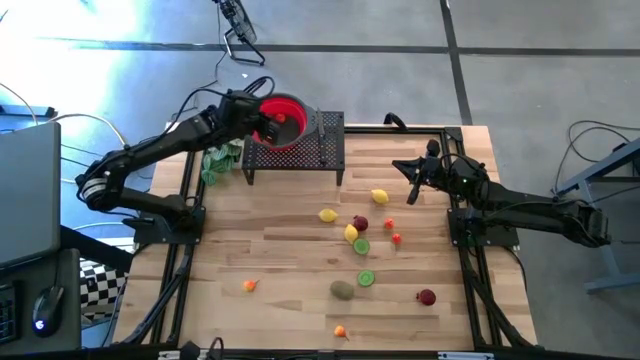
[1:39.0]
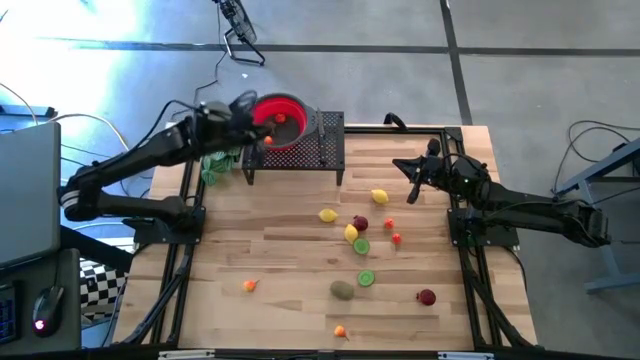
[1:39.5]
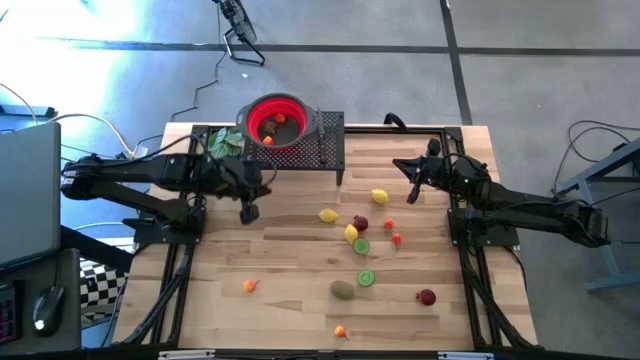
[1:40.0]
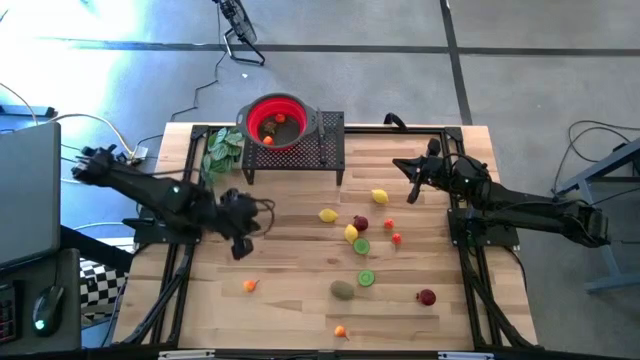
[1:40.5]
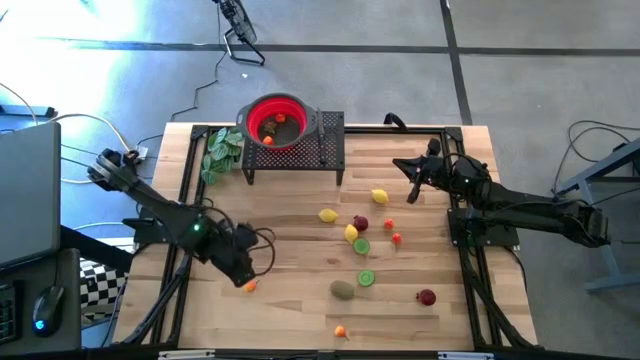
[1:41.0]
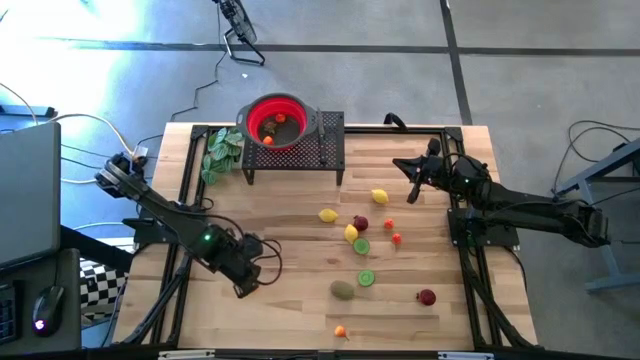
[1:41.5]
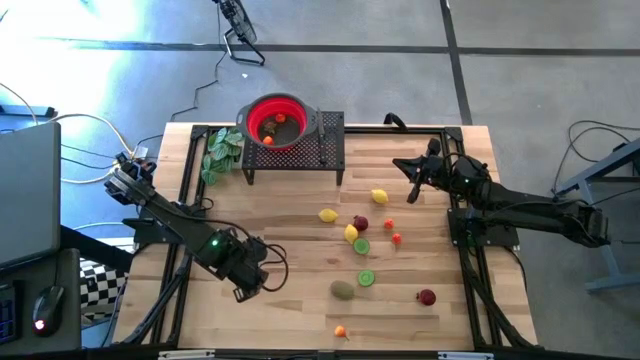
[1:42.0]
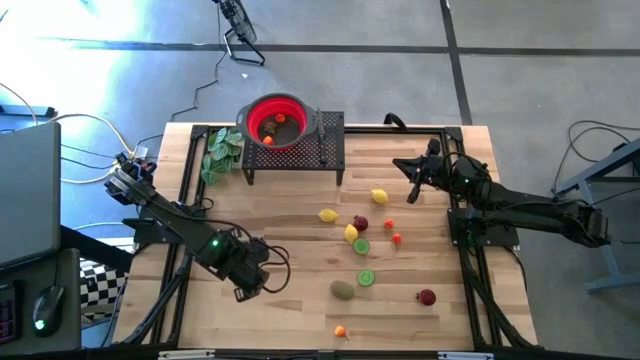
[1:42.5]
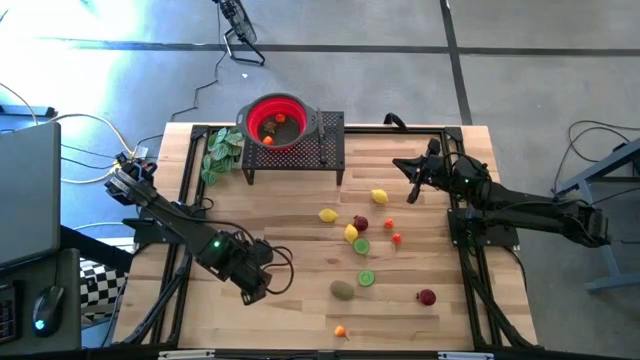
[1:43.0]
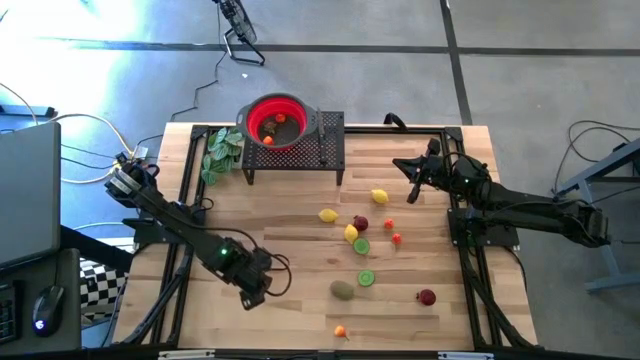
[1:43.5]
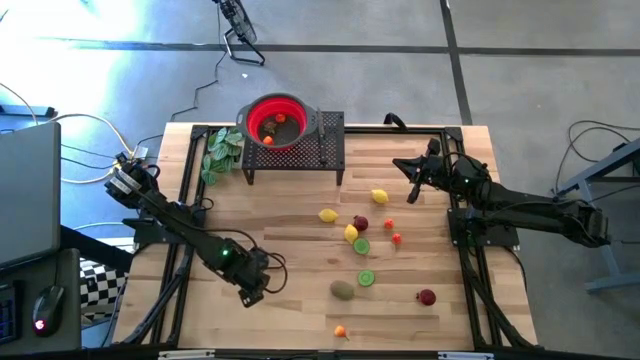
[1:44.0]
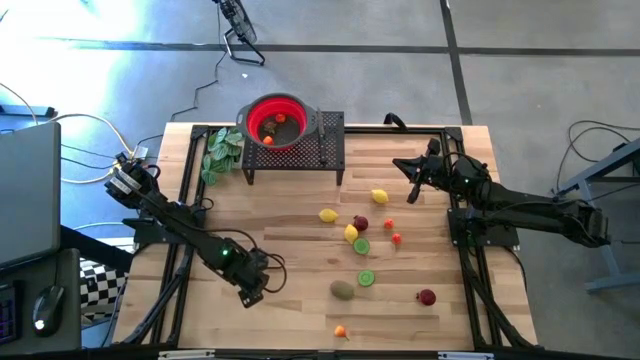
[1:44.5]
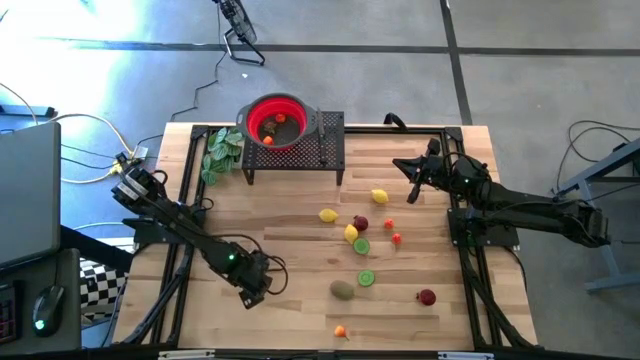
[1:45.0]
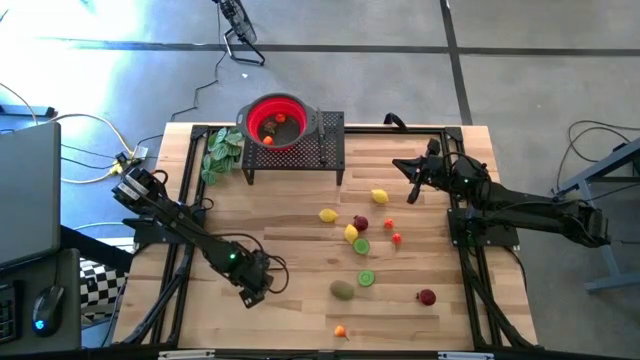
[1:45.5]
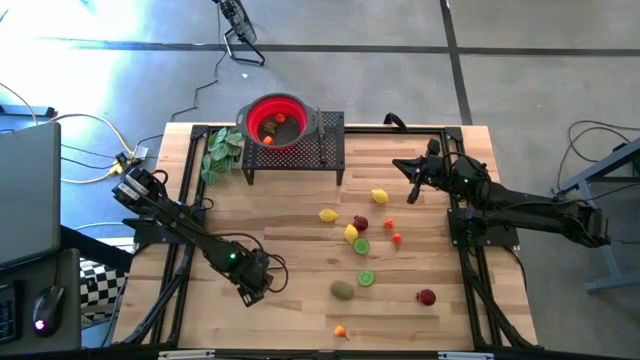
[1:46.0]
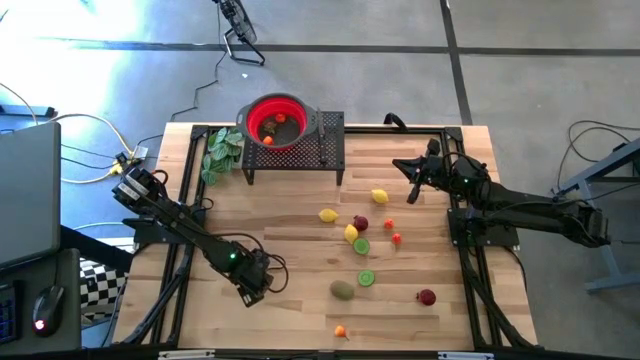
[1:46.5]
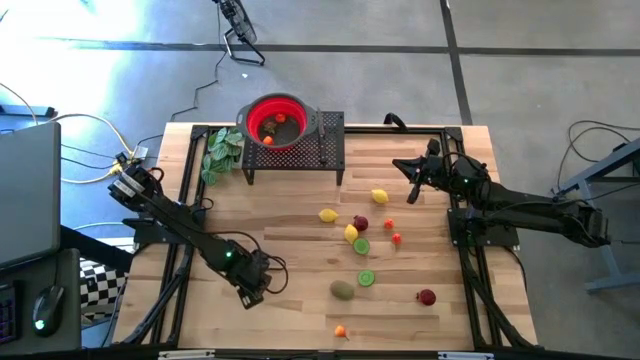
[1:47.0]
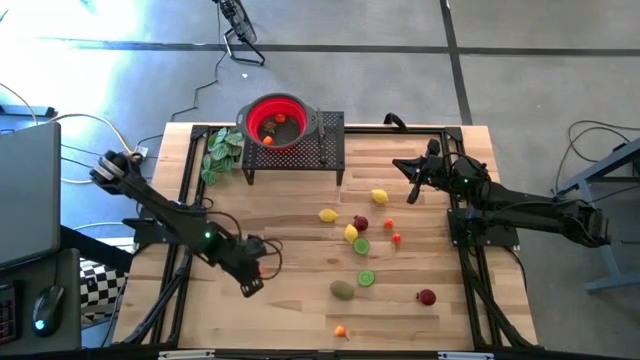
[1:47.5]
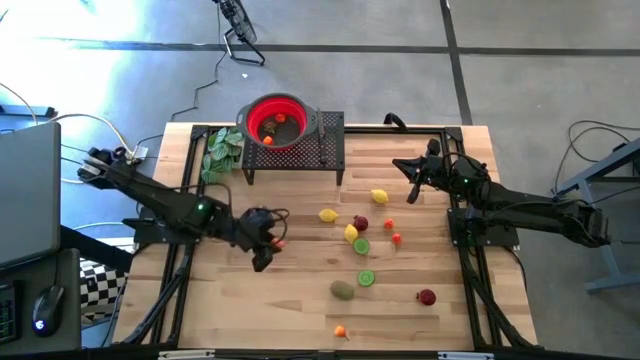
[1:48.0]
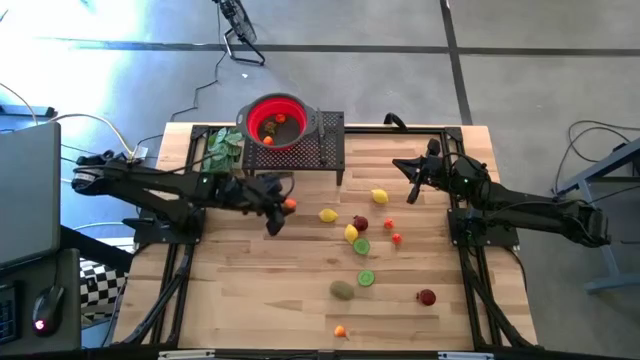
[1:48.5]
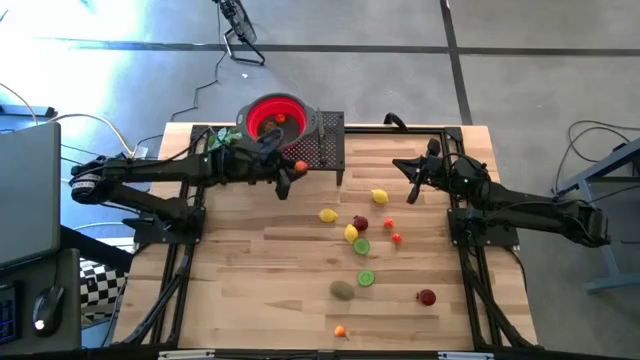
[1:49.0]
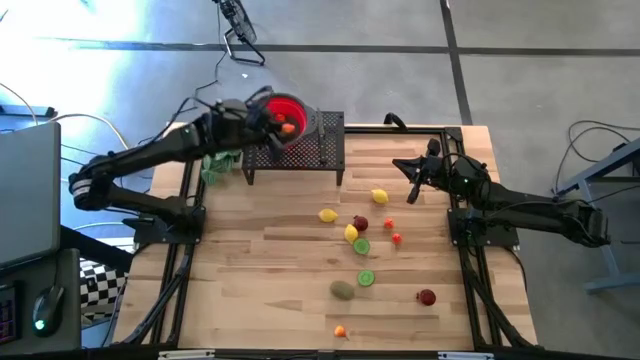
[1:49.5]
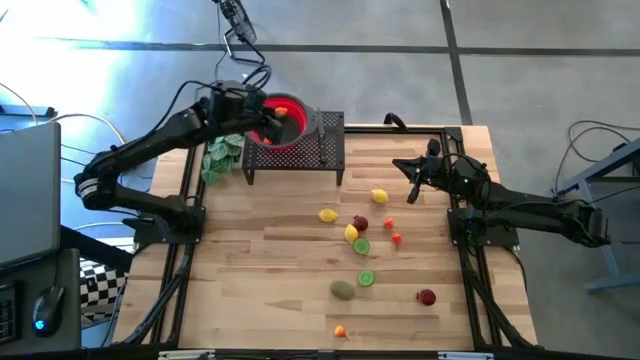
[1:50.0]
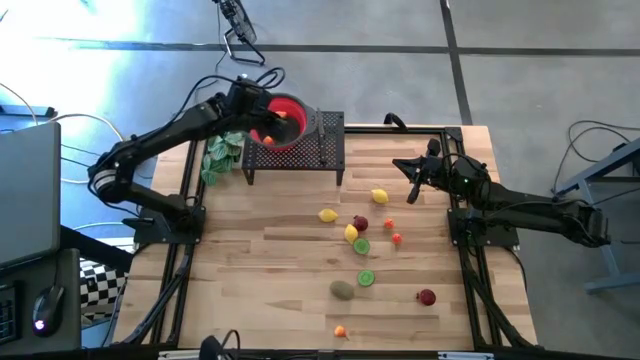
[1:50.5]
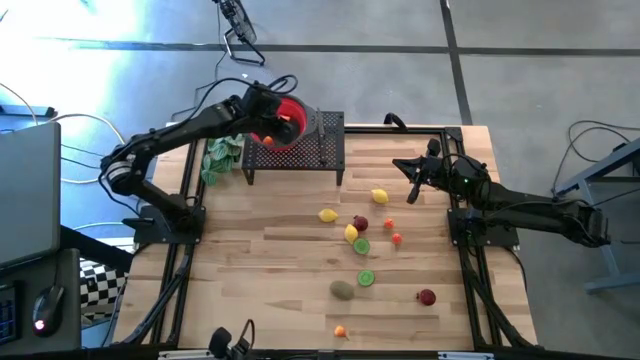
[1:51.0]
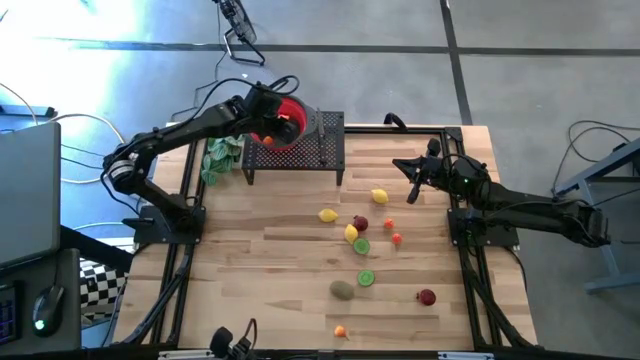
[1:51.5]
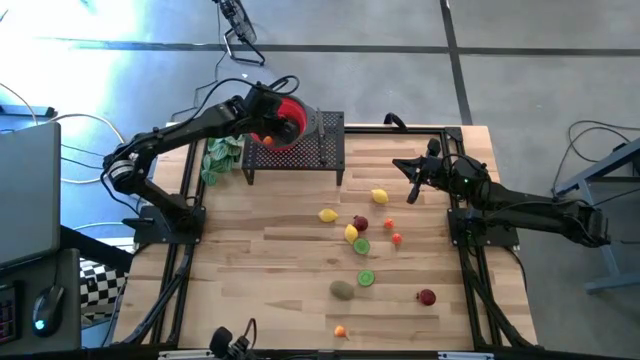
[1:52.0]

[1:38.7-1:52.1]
Task: Pick & Place Fruit
Put the orange pear into the red strainer bowl on the shelf

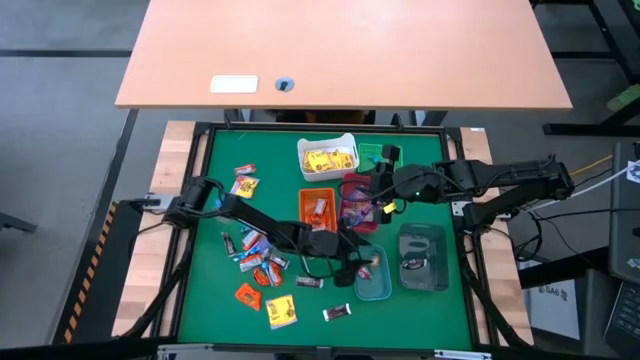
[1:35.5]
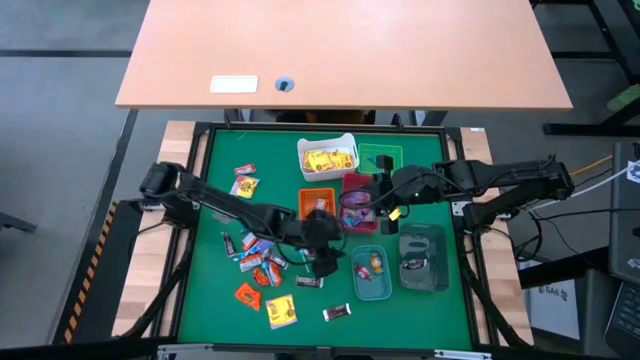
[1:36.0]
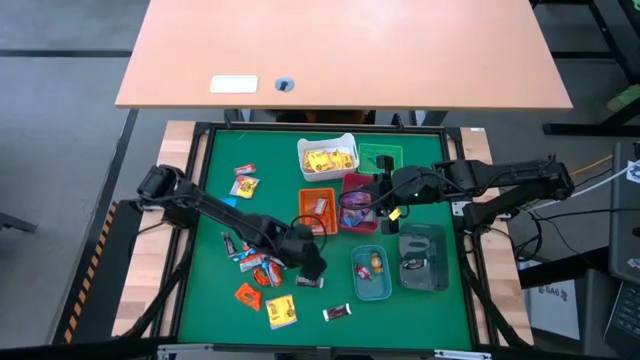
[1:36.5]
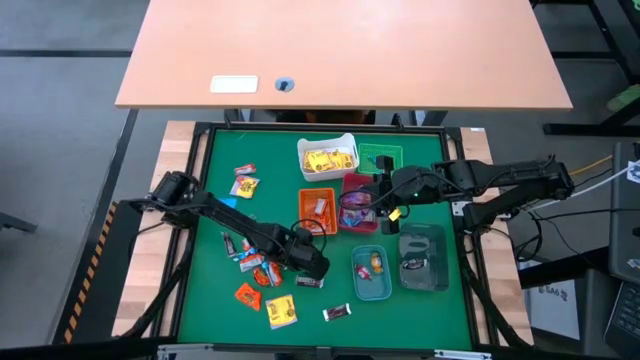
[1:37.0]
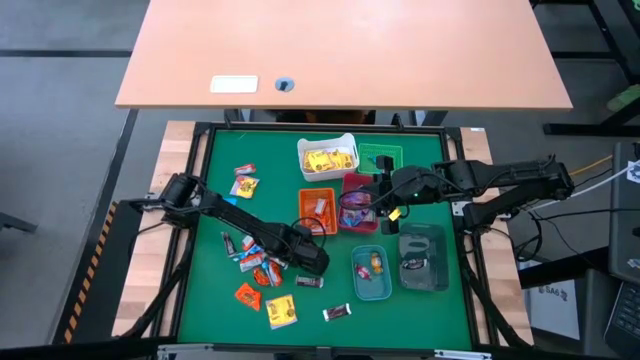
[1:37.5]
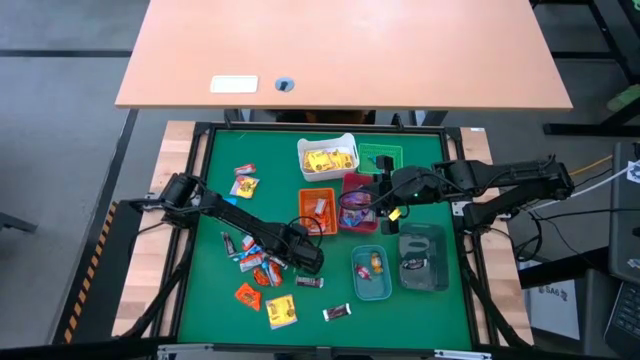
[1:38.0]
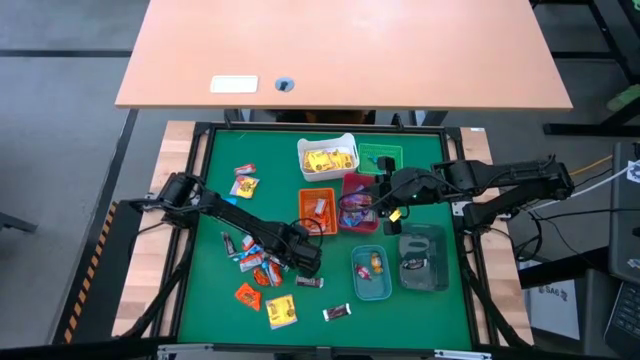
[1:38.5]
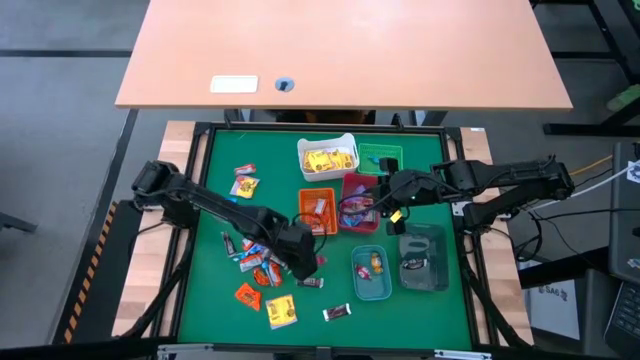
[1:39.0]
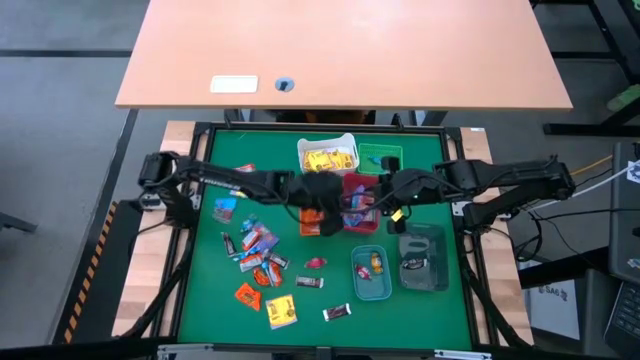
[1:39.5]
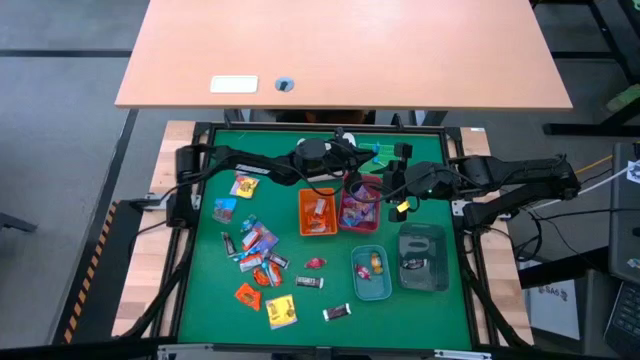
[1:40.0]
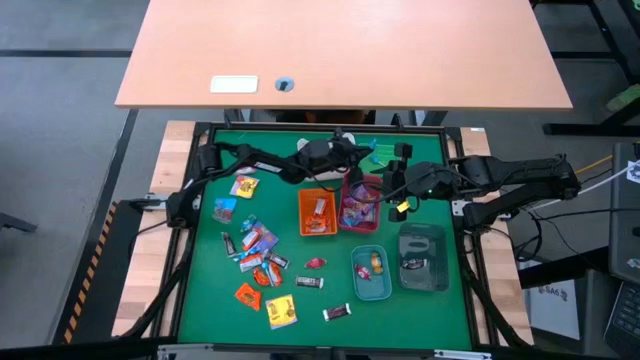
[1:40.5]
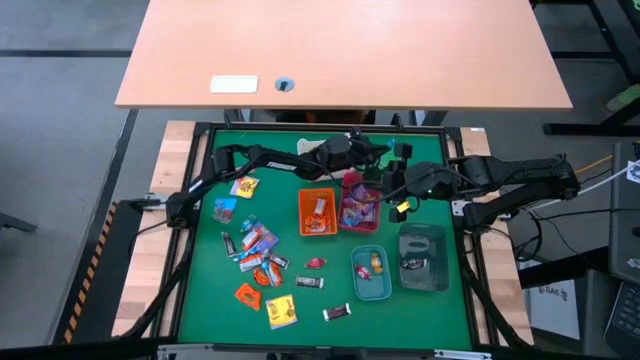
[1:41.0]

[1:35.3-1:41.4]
Task: Sort candy
Put the blue lollipop into the green basket

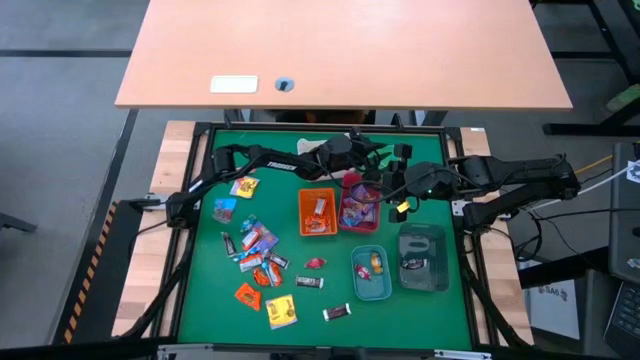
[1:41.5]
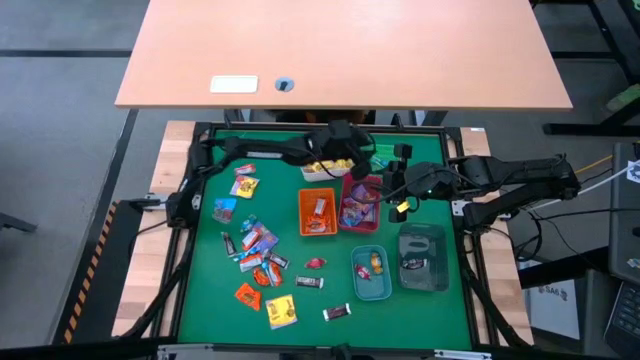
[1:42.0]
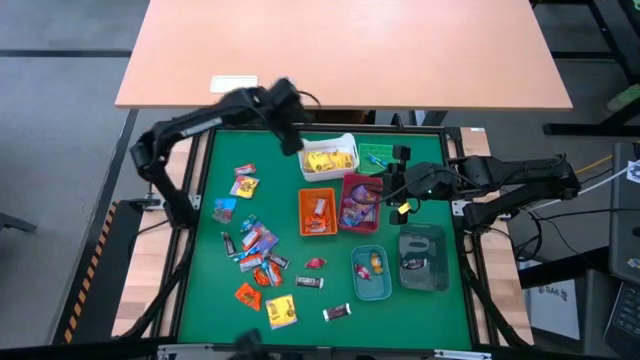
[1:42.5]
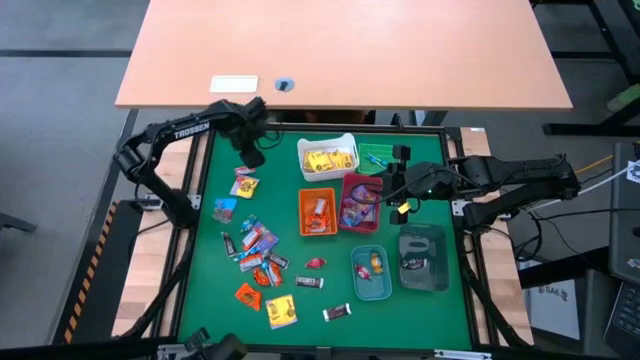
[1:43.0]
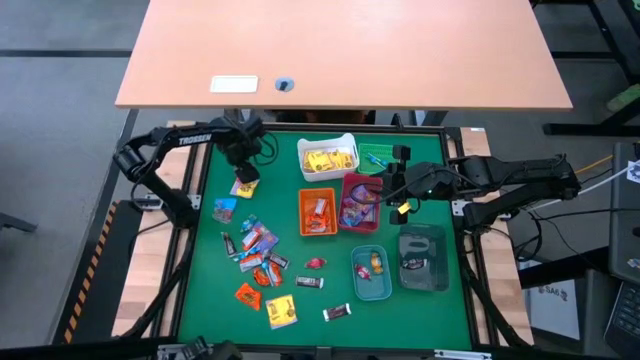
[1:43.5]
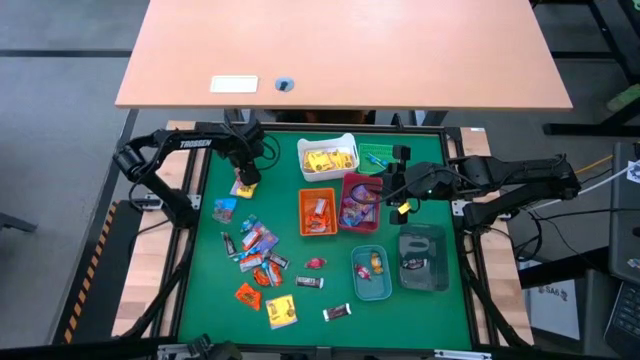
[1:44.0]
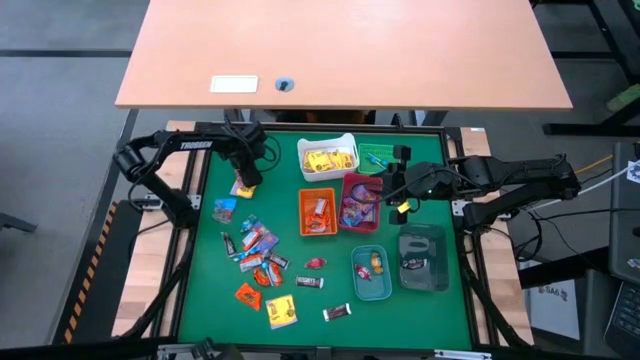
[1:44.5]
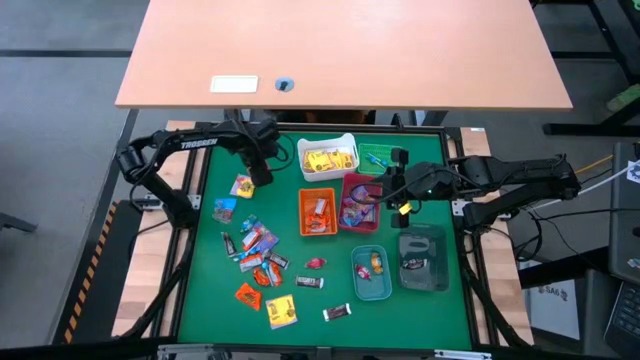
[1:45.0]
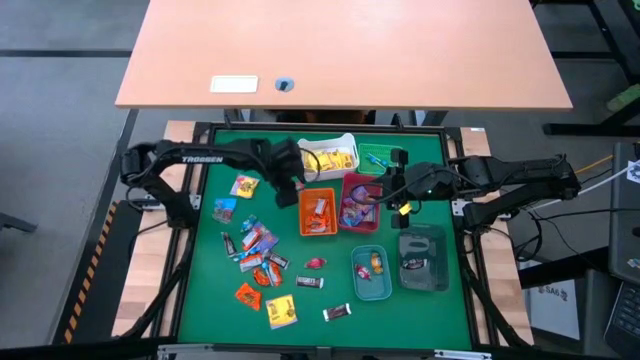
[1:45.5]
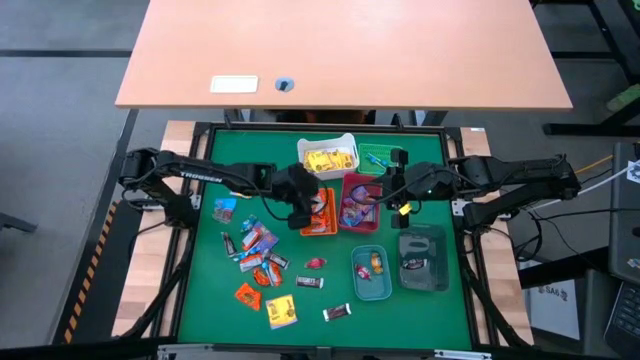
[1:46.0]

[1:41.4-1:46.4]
Put the orange chocolate into the orange basket
